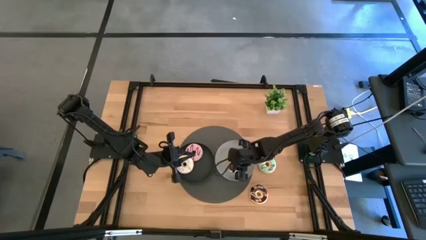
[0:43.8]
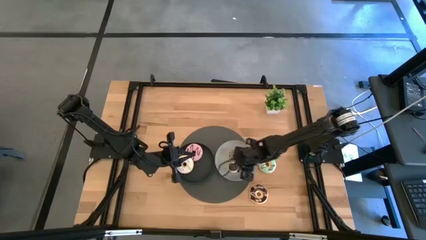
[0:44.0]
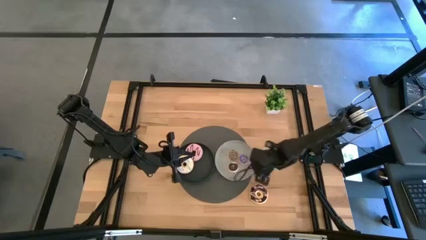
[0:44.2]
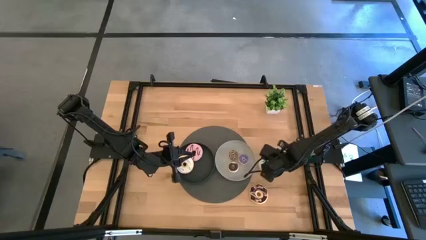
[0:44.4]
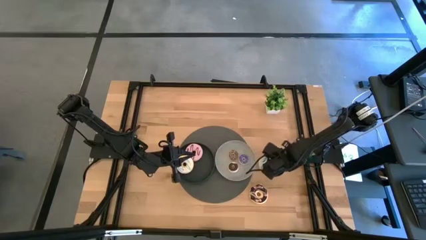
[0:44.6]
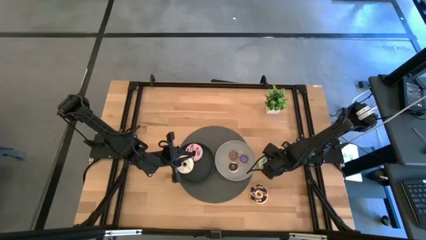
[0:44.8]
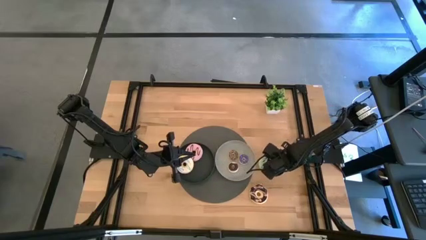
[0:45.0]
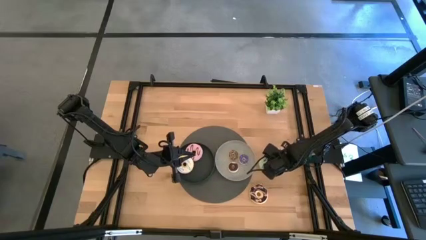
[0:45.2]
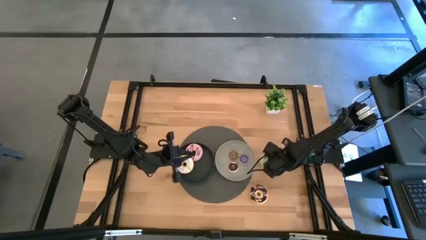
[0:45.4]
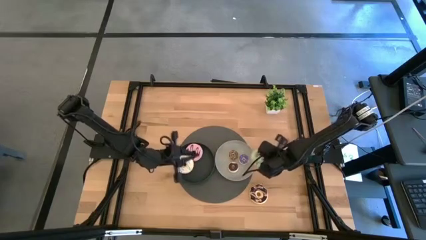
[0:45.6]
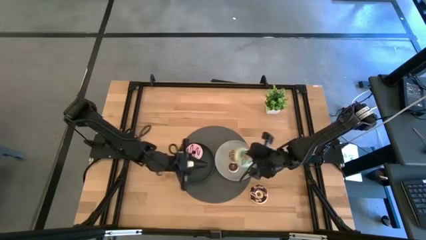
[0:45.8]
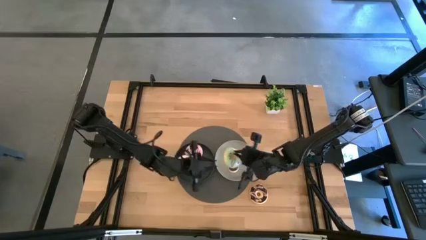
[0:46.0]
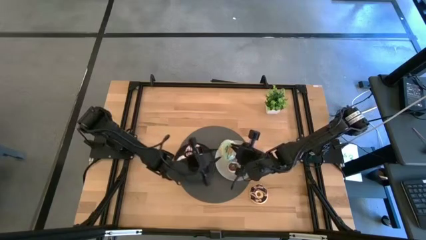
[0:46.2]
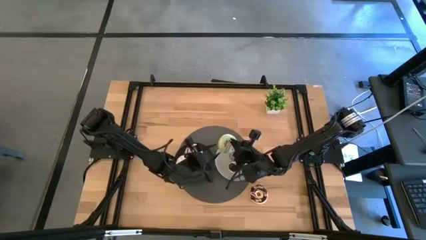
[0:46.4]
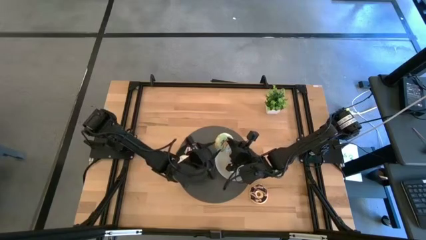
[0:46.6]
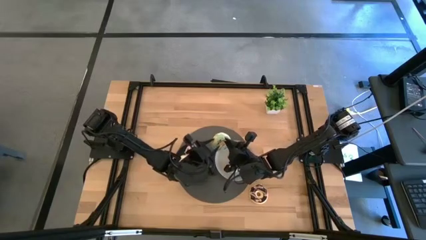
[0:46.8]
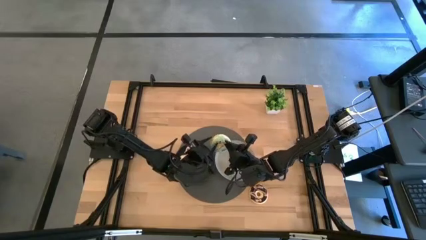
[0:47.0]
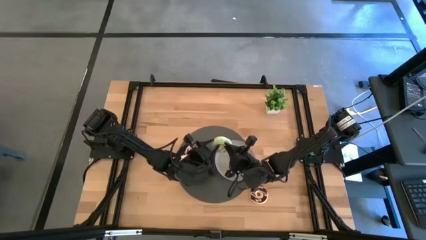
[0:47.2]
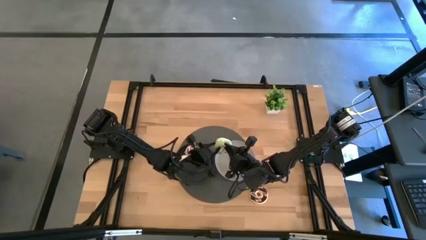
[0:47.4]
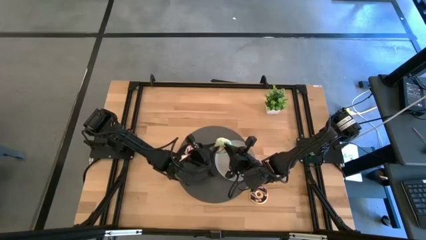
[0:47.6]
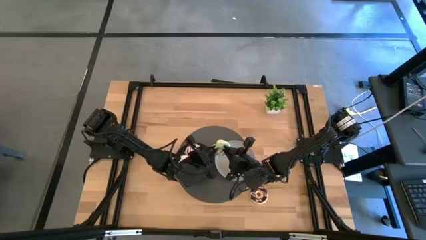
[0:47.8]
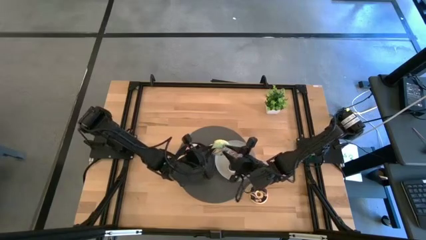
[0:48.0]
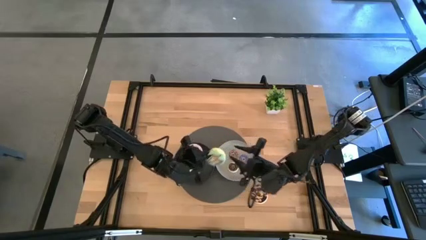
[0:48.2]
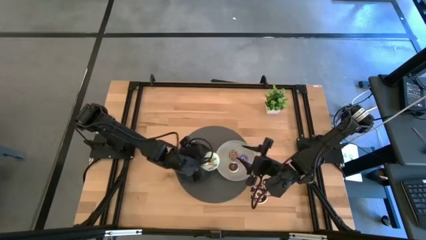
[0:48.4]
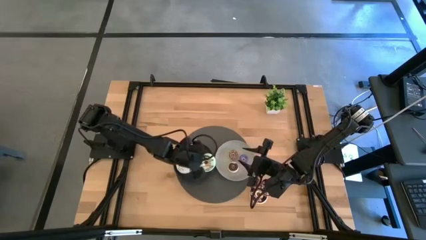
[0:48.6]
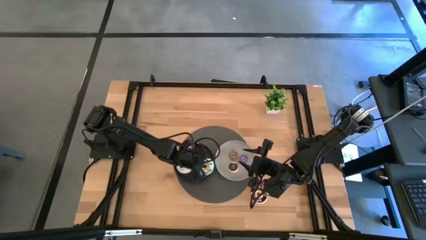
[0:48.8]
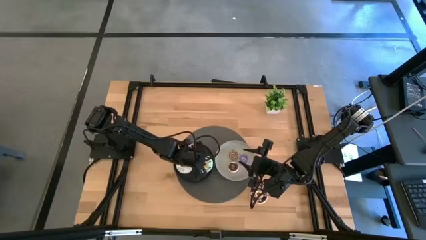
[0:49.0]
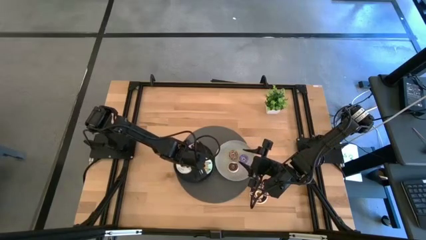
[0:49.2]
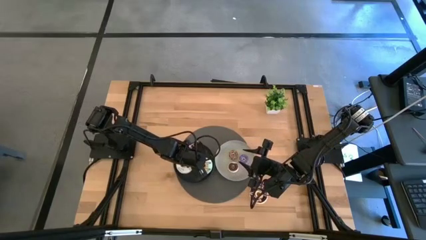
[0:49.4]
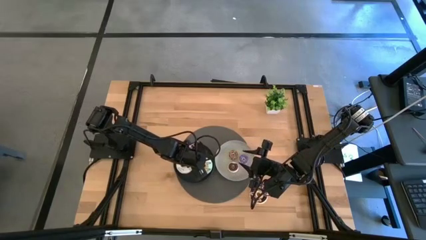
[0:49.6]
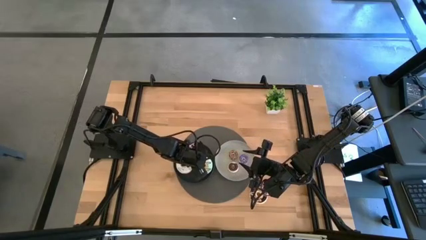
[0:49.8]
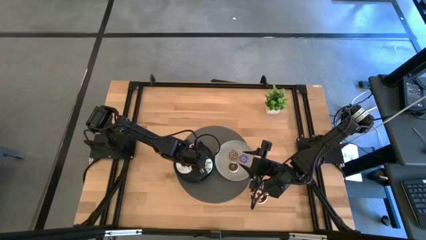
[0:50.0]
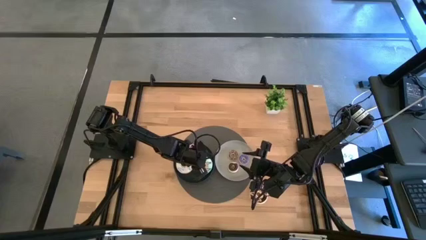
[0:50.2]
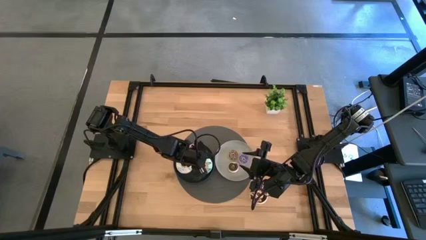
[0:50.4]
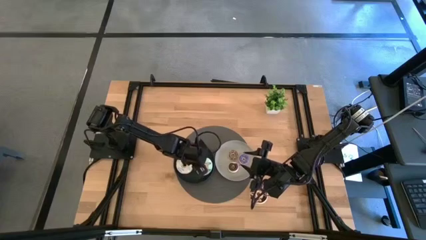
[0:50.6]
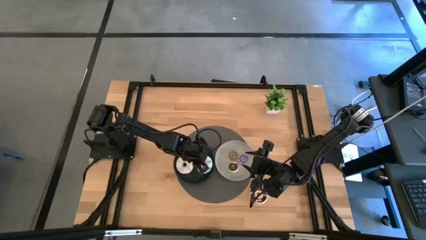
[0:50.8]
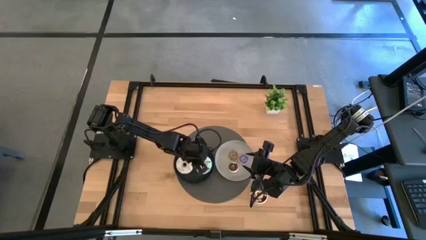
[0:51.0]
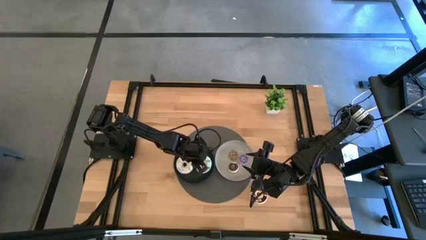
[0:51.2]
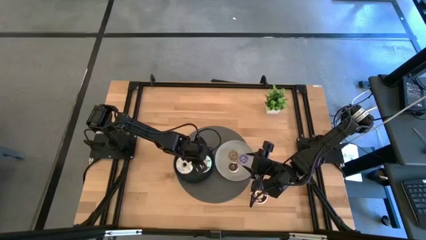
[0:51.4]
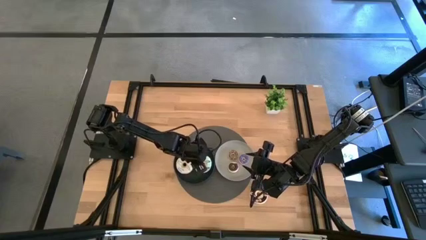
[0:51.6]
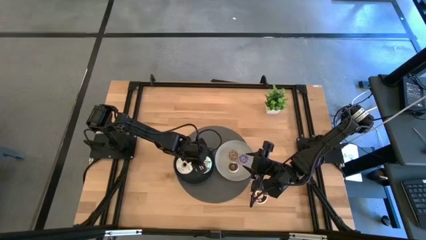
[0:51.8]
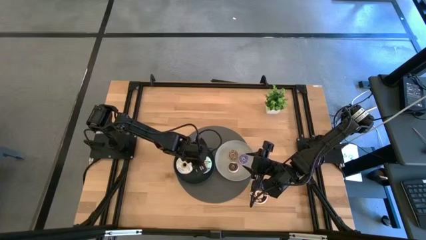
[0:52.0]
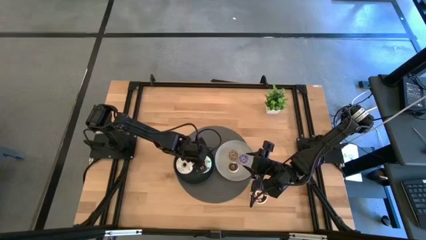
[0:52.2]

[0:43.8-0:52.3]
Task: Pick & Place donuts
Put the big blue donut on the black plate

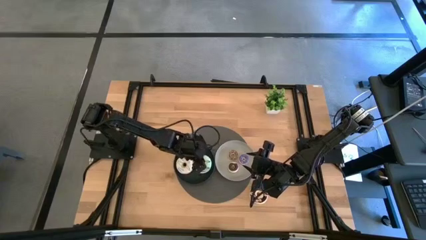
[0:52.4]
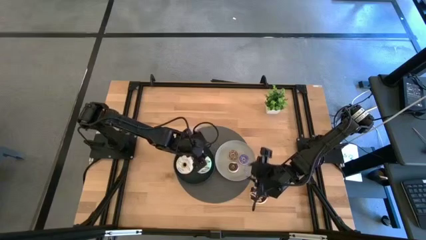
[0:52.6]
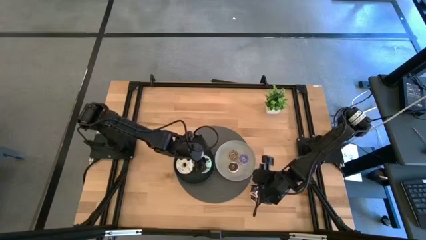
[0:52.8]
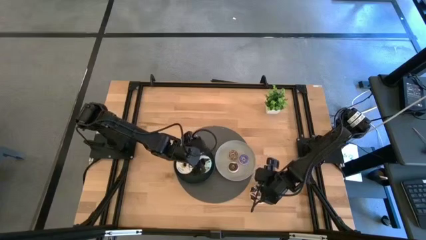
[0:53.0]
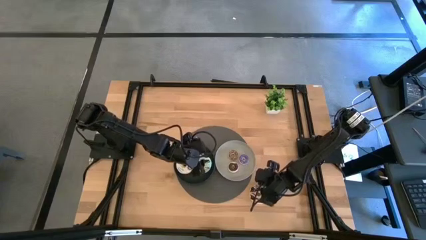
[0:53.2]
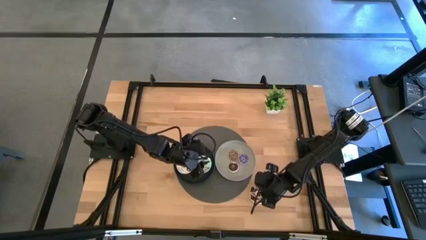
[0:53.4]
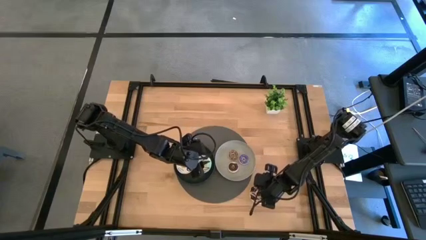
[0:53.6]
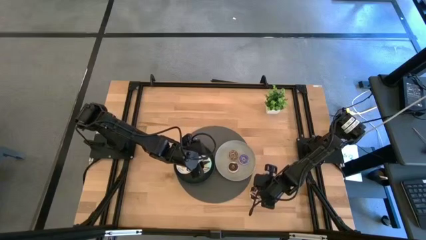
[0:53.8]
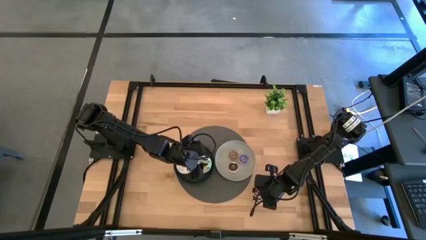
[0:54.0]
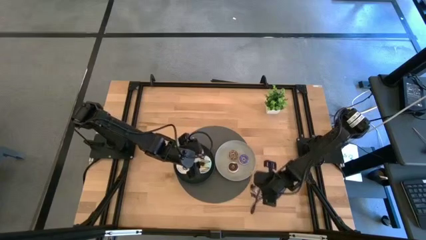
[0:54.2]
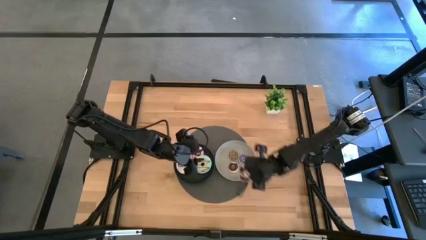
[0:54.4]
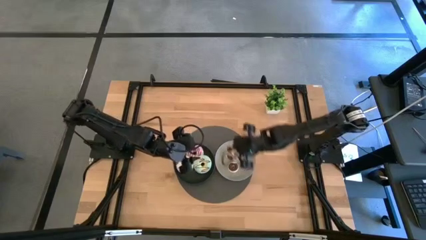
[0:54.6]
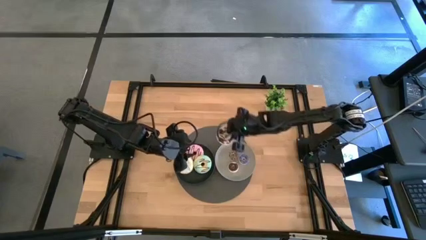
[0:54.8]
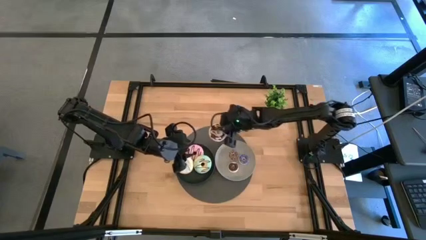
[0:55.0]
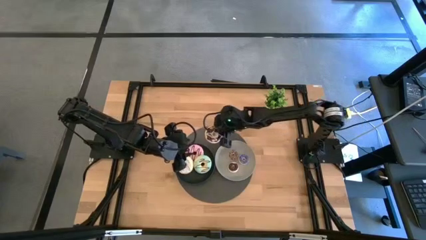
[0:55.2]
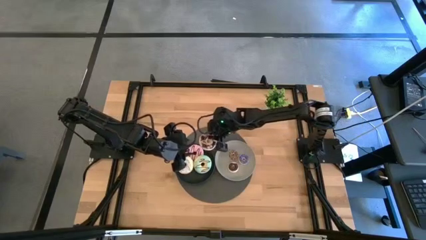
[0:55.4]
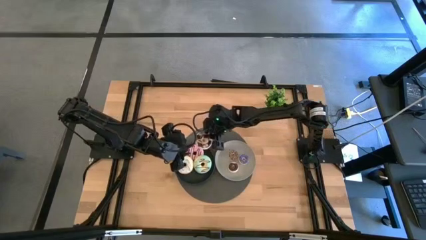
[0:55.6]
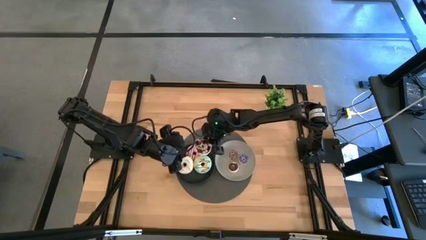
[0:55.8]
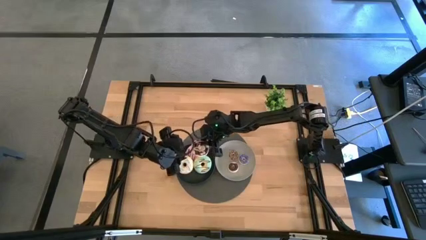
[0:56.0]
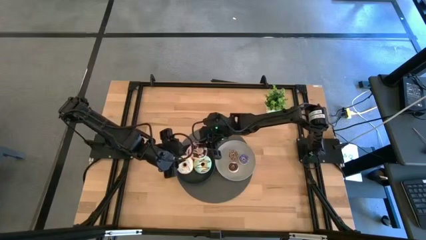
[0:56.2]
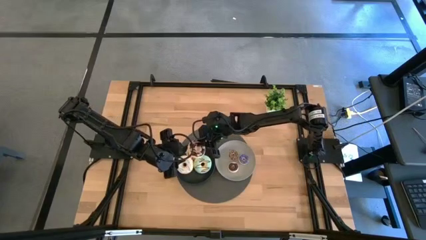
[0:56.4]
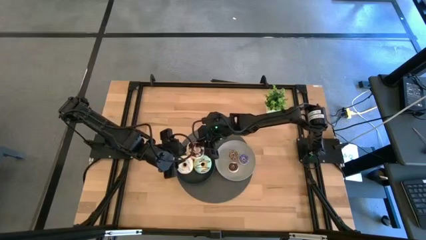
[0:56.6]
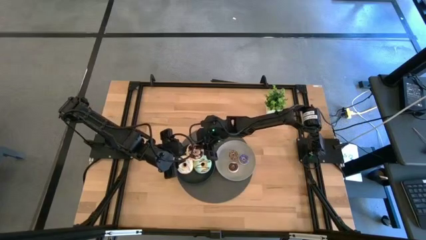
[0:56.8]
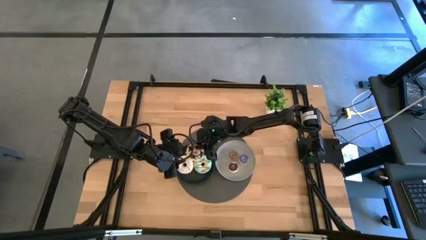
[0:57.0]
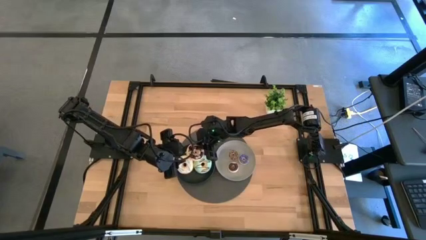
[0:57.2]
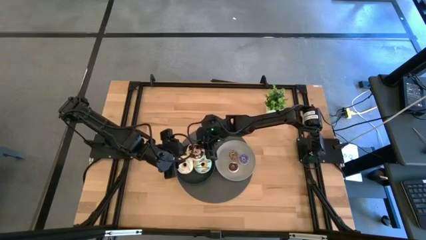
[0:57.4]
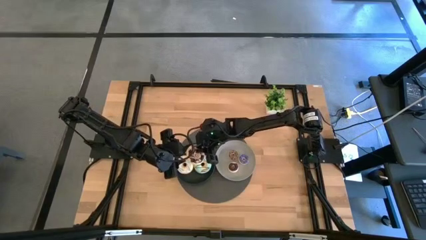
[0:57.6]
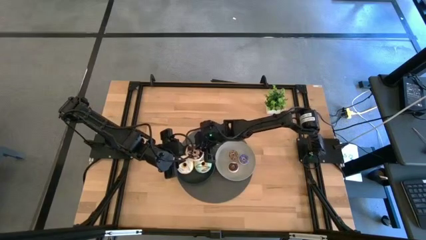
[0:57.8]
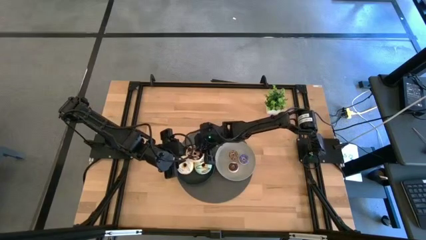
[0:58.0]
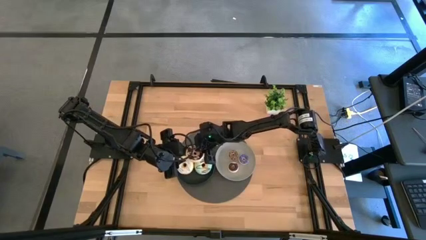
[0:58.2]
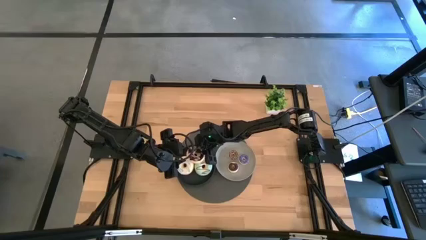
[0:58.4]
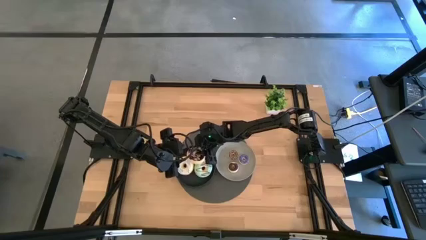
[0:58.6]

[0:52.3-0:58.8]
Put the big black donut on the black plate
